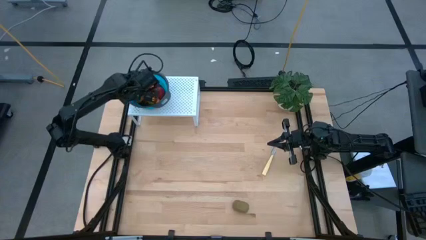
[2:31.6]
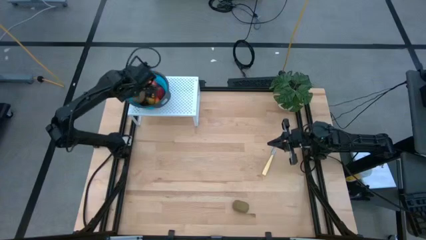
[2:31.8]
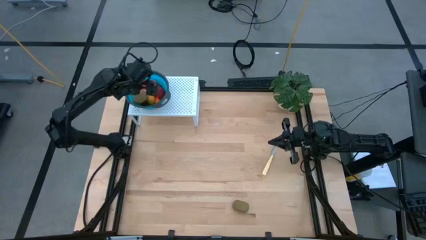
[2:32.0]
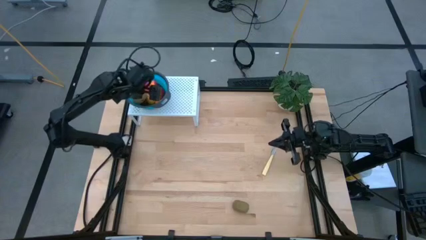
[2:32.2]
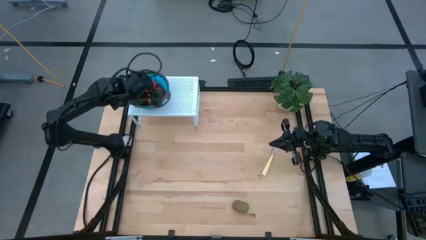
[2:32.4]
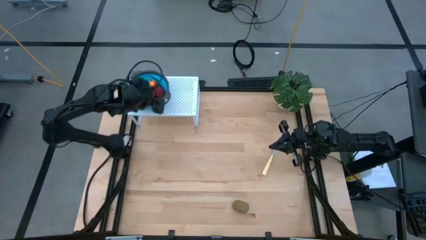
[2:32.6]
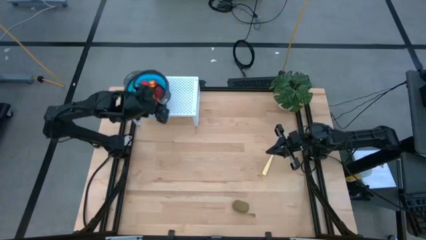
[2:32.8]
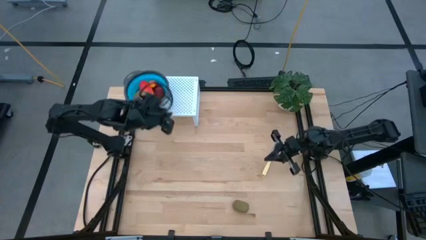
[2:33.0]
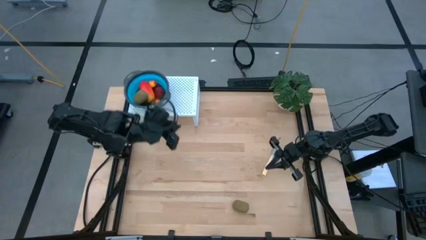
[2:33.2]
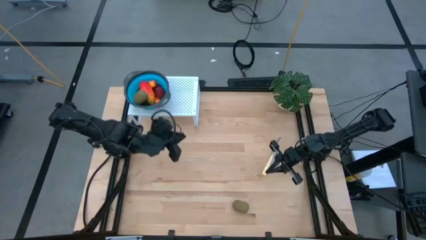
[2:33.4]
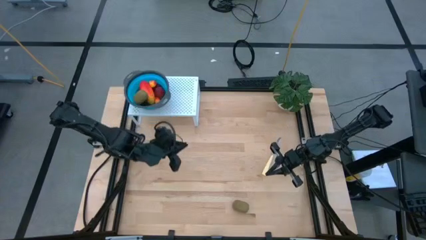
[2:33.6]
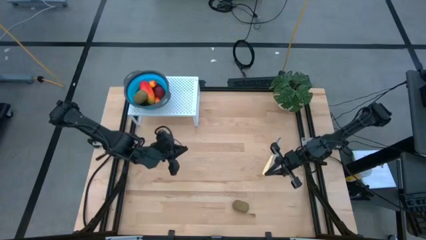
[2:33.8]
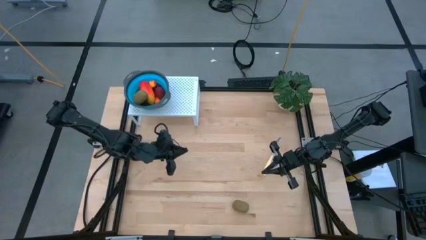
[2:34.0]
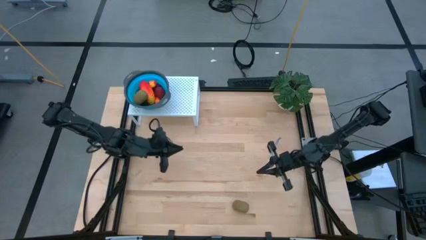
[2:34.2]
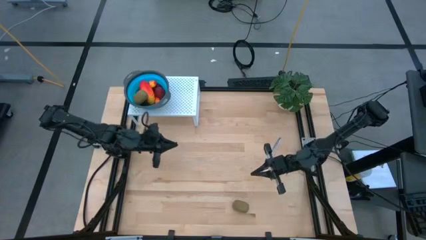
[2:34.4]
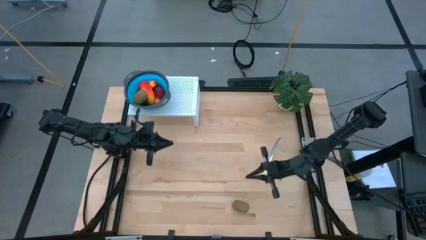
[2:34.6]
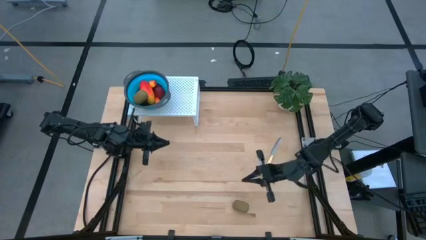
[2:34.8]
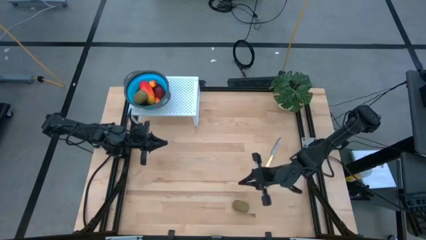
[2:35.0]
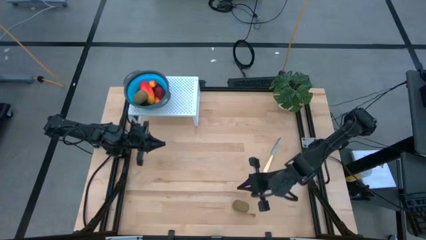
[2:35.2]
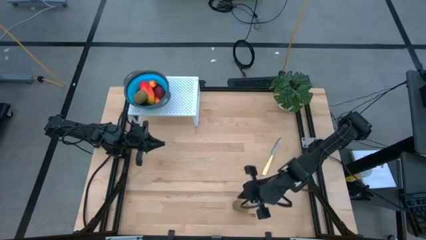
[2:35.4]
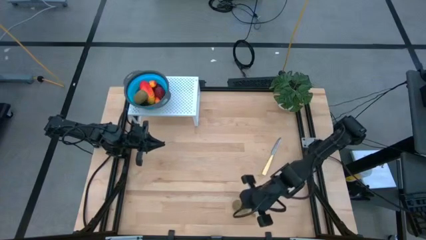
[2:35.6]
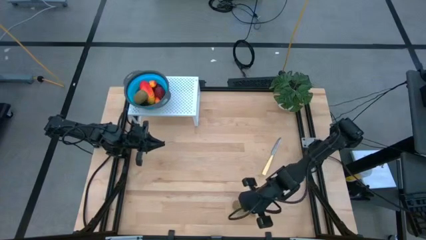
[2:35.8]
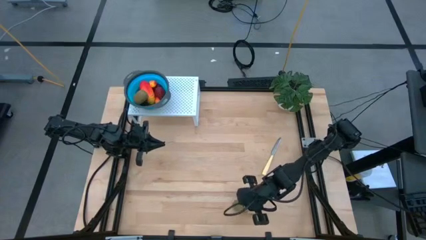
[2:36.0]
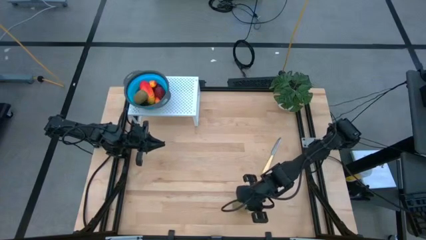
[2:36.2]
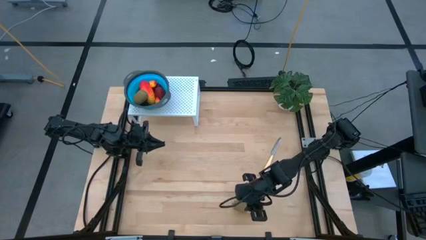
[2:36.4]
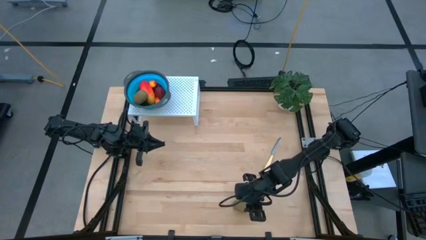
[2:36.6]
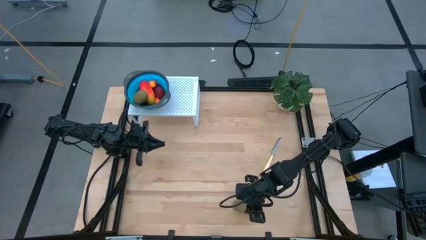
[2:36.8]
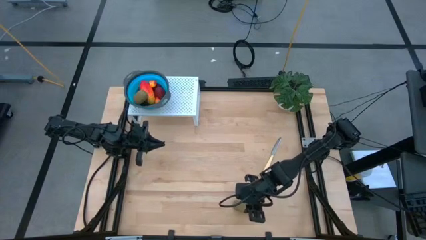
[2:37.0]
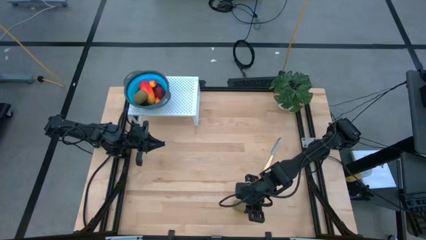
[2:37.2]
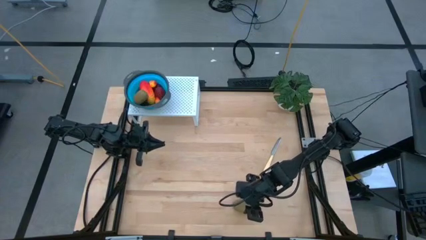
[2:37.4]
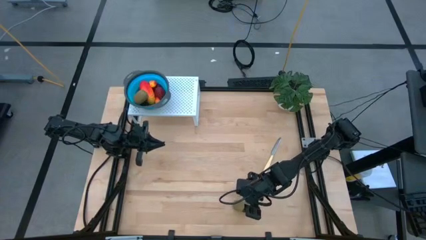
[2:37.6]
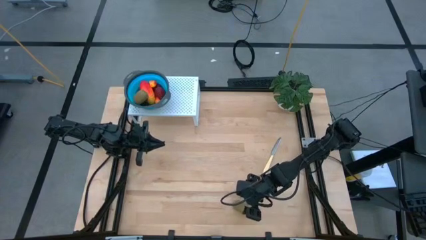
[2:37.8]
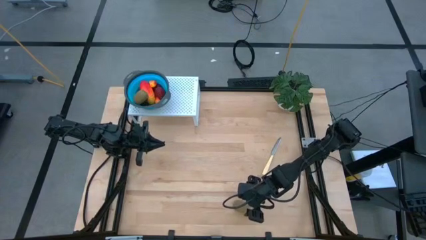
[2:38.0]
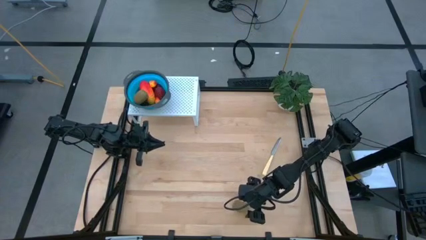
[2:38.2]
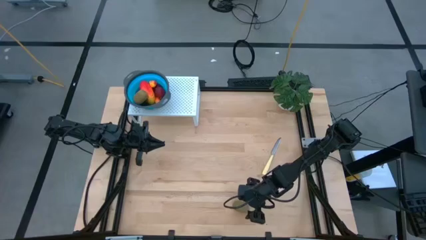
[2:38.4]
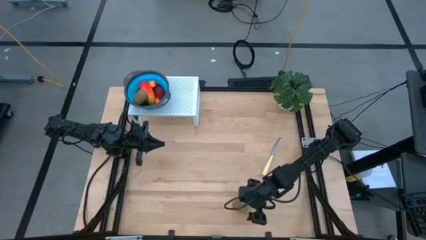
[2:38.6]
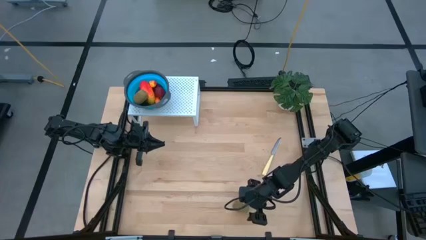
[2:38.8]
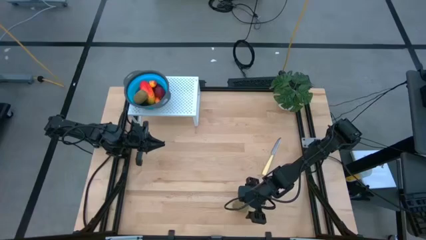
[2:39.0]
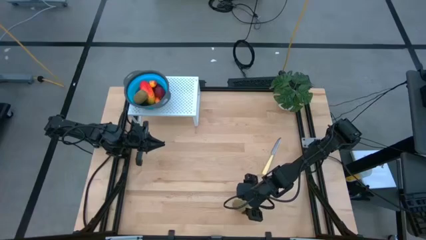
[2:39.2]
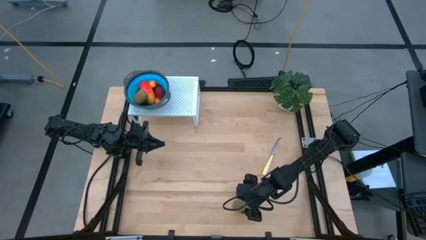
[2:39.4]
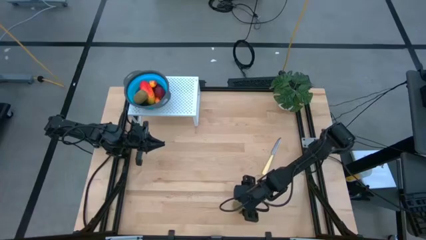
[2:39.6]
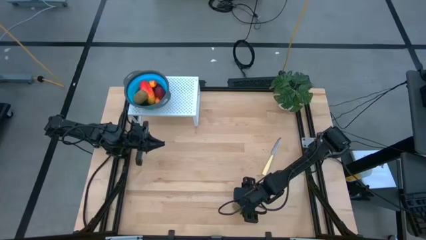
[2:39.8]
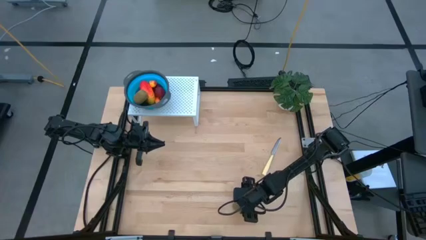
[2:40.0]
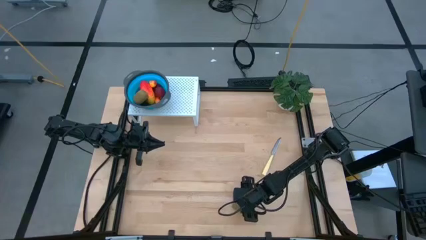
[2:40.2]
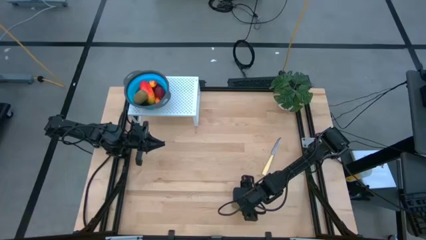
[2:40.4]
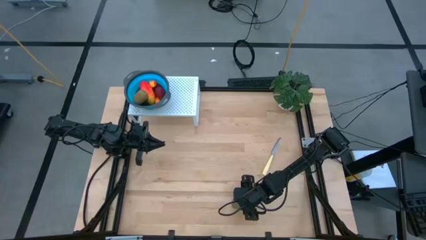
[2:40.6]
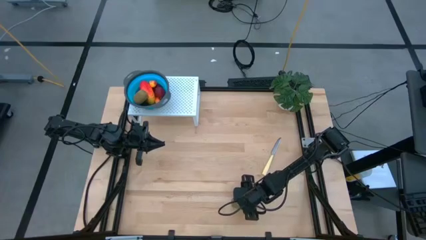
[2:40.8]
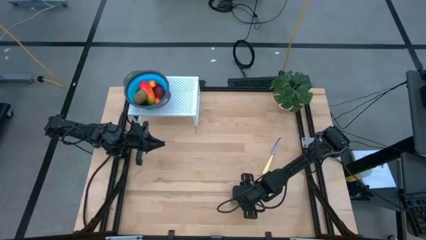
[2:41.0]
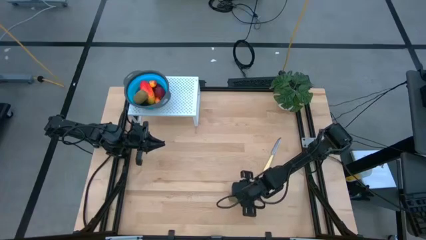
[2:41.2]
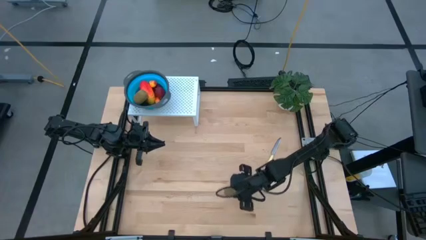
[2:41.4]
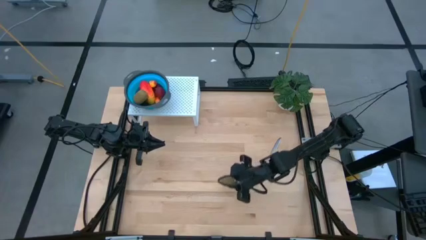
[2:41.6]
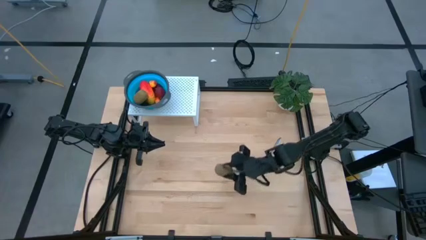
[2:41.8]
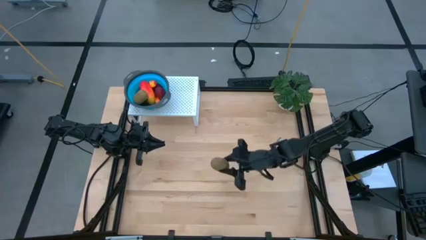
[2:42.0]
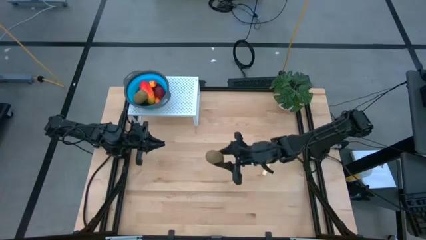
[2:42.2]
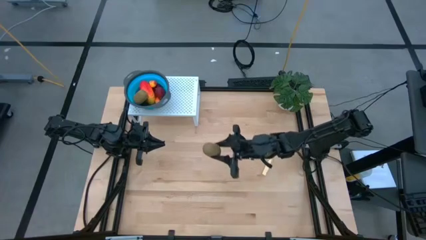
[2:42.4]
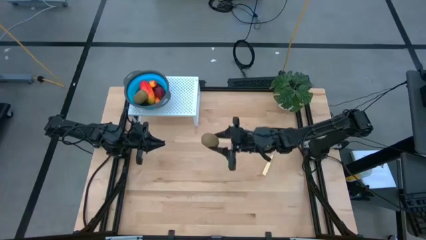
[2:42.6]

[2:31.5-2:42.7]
Task: Pick & Place Fruit
Put the kiwi into the blue strainer bowl on the shelf

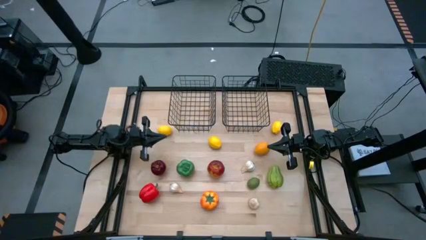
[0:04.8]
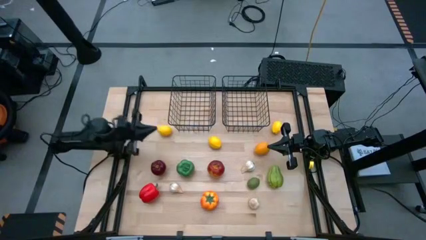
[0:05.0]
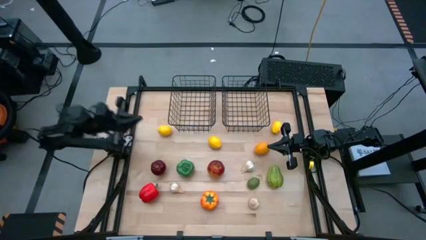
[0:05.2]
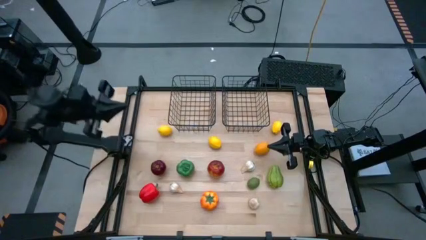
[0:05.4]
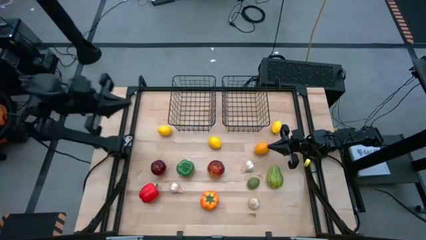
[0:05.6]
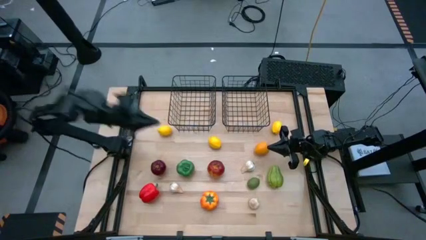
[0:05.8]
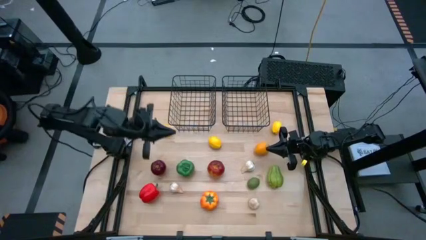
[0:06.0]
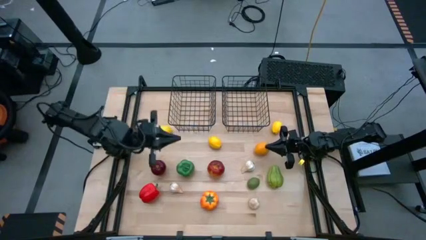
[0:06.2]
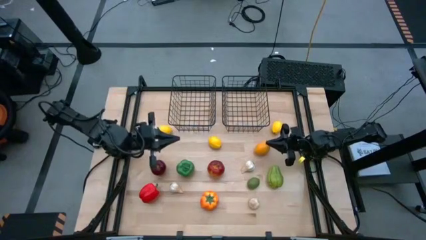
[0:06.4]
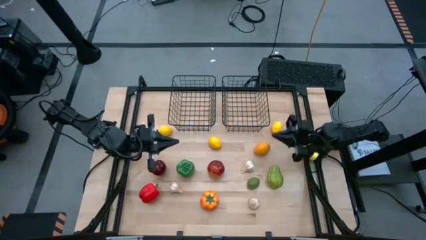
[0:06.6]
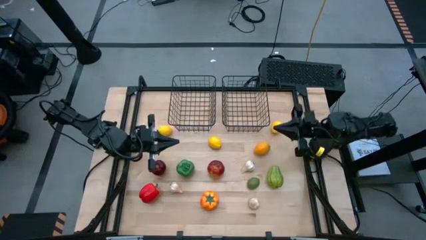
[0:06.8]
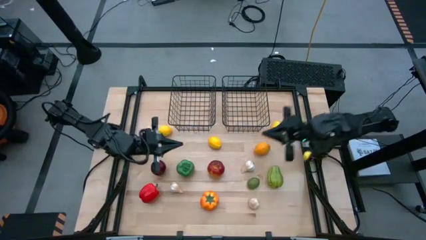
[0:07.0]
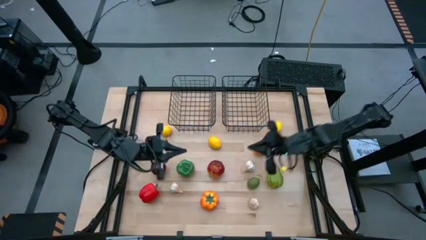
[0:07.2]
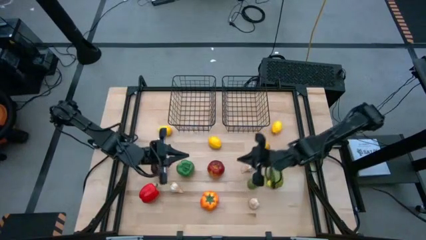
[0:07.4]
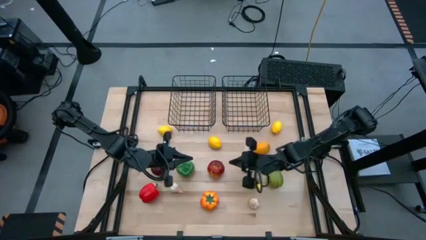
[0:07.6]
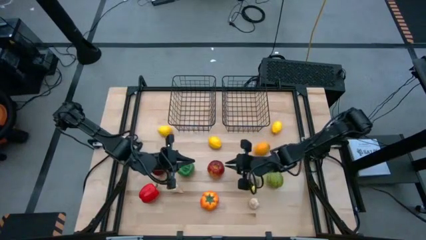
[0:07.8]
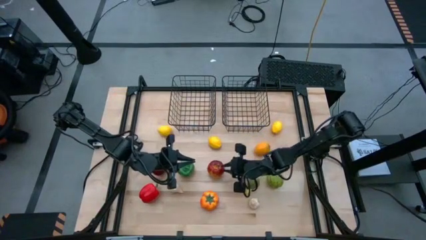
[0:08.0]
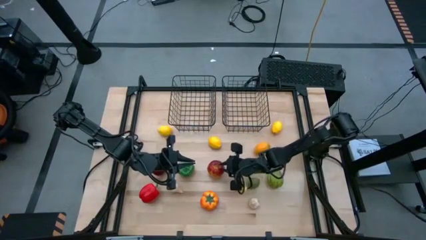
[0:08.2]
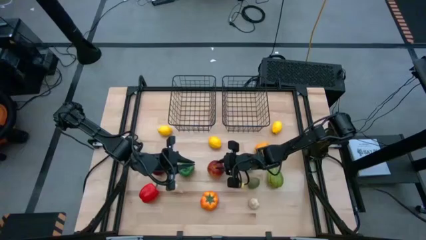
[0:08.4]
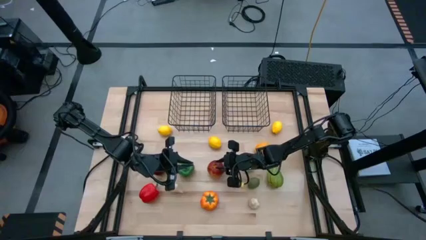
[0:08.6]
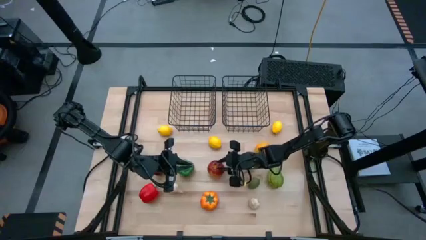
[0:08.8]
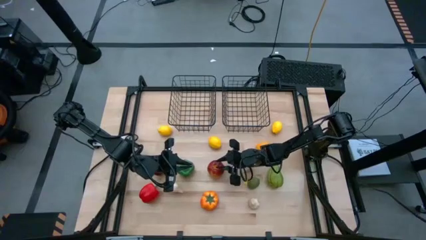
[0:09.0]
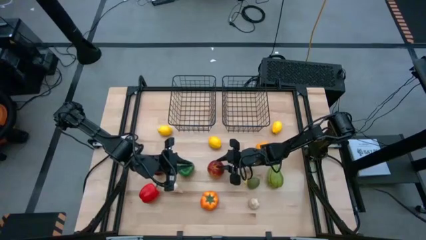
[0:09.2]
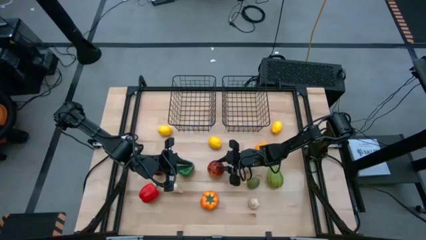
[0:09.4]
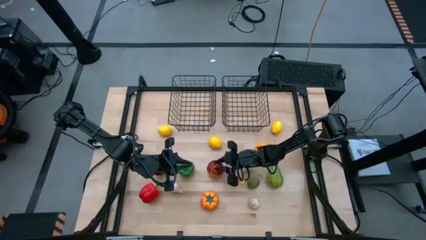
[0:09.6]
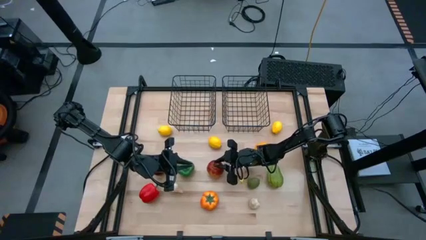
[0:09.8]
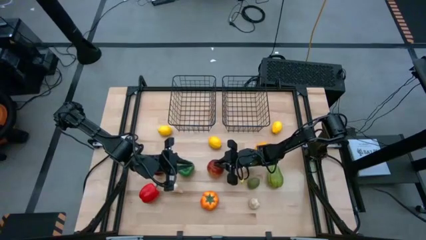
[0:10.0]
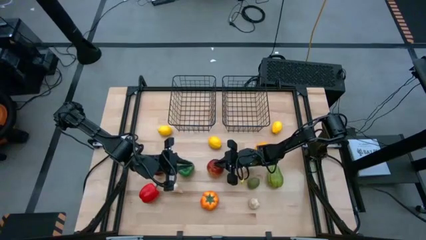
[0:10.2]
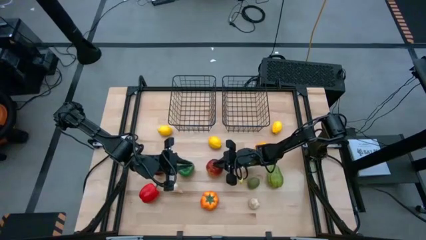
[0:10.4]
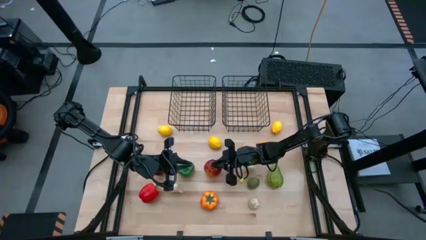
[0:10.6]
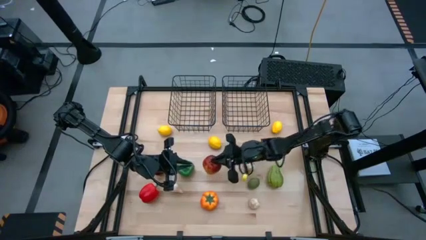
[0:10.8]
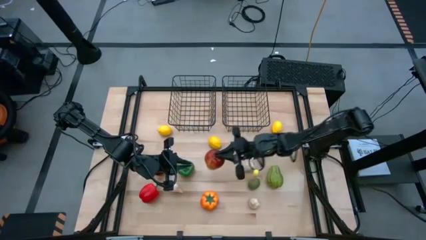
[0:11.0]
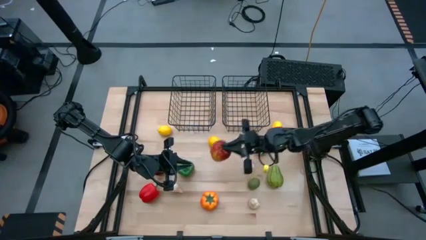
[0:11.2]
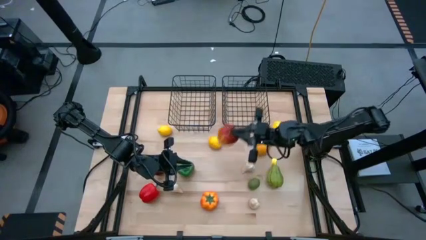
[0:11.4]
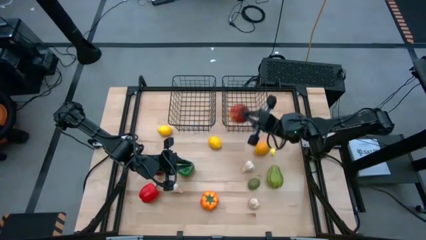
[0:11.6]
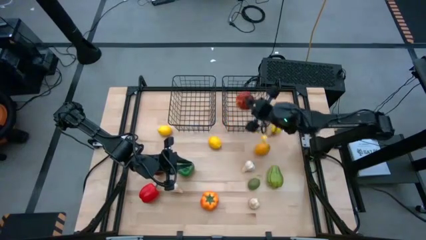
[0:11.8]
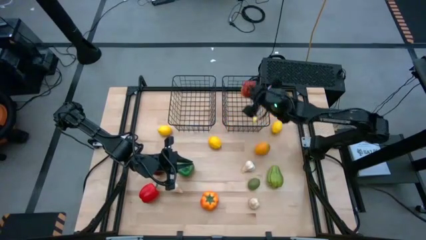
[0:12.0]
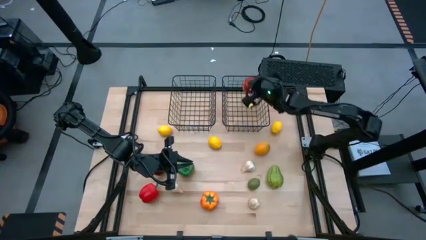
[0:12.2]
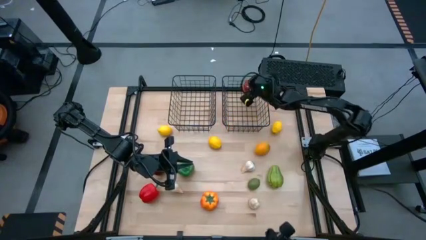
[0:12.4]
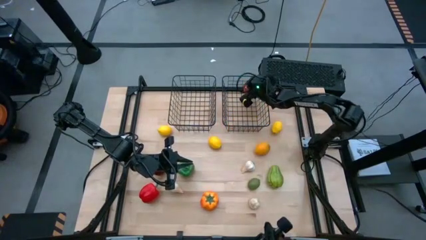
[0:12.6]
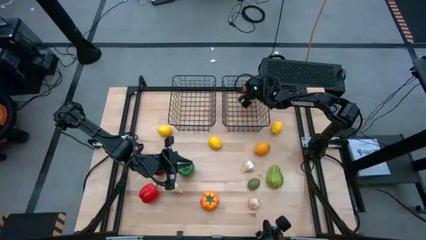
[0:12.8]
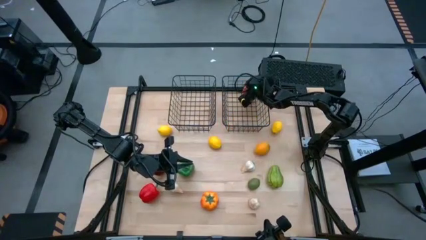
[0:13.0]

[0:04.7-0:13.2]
Task: Sort produce into baskets
Put the red apple into the right wire basket
